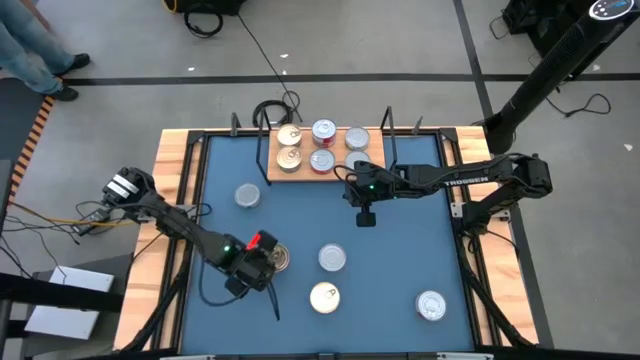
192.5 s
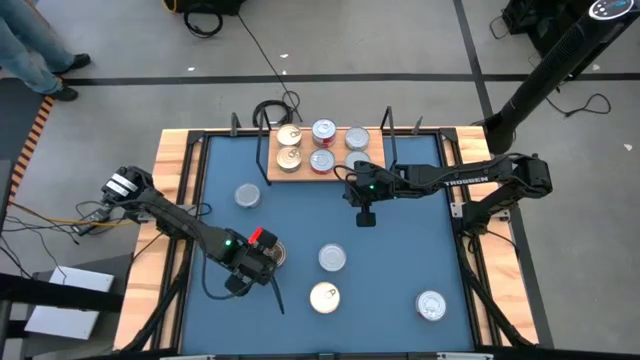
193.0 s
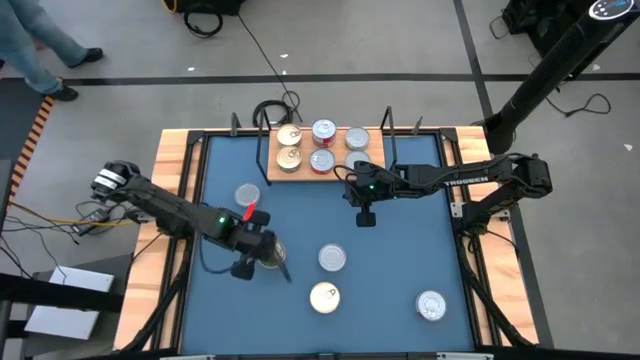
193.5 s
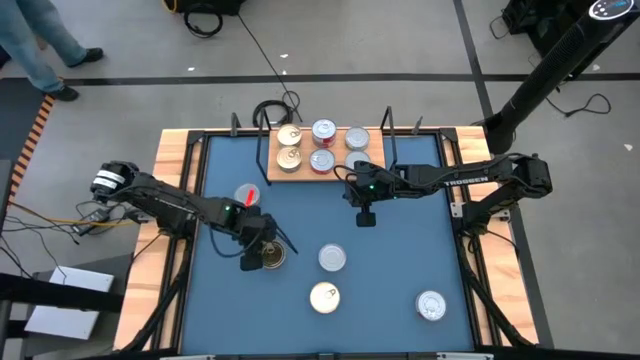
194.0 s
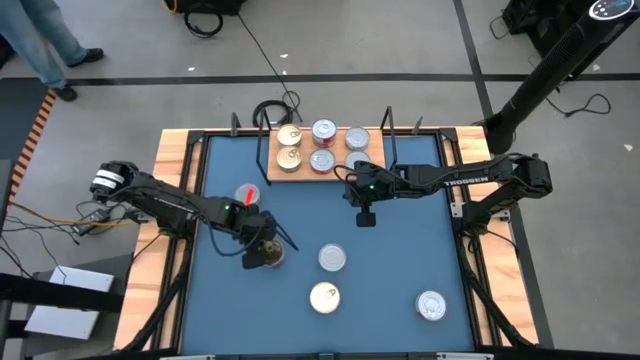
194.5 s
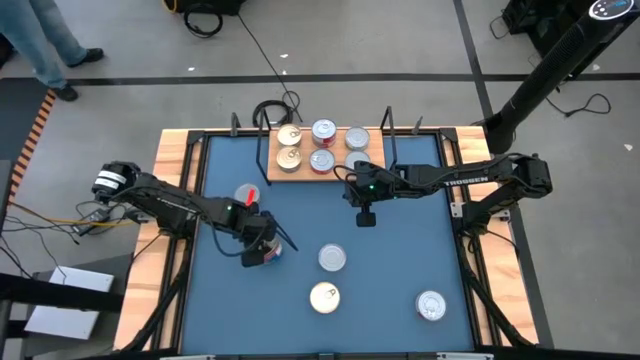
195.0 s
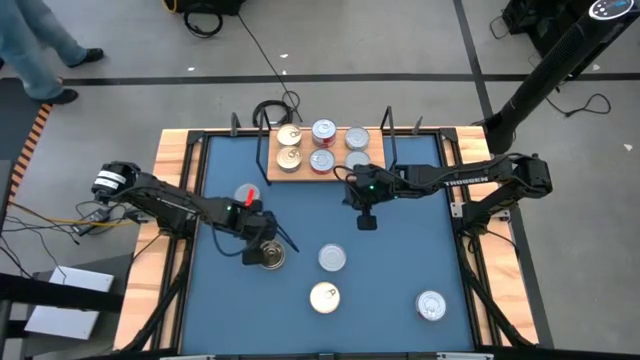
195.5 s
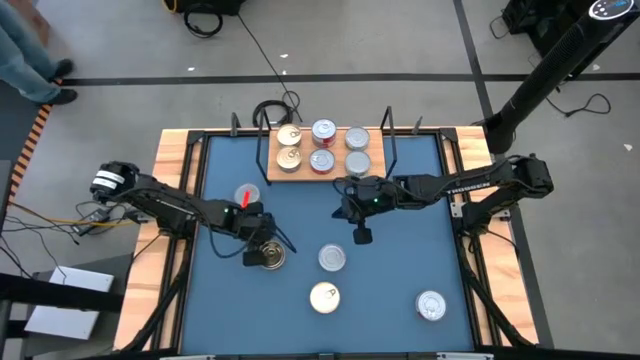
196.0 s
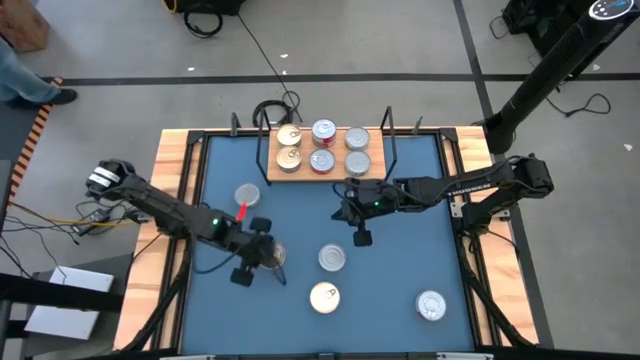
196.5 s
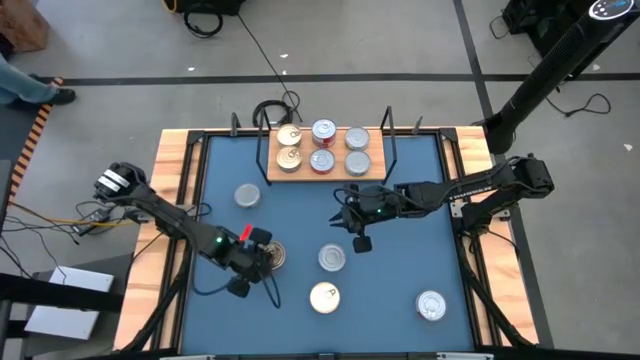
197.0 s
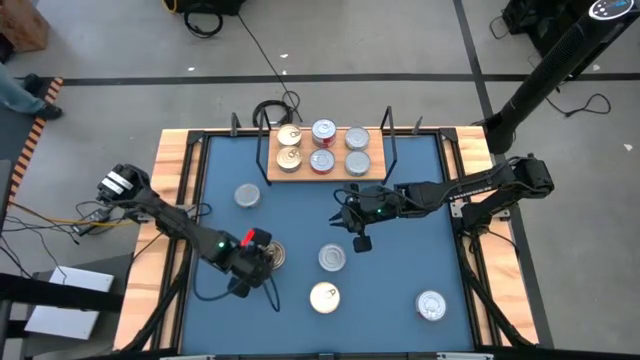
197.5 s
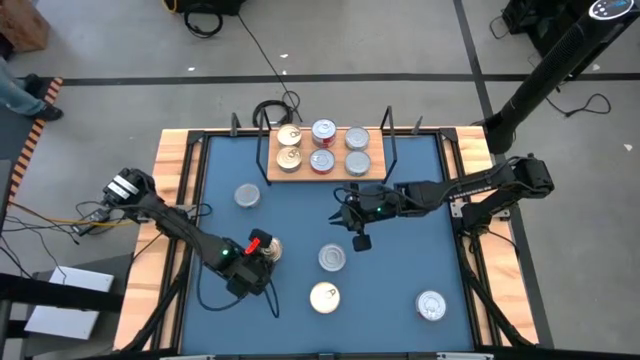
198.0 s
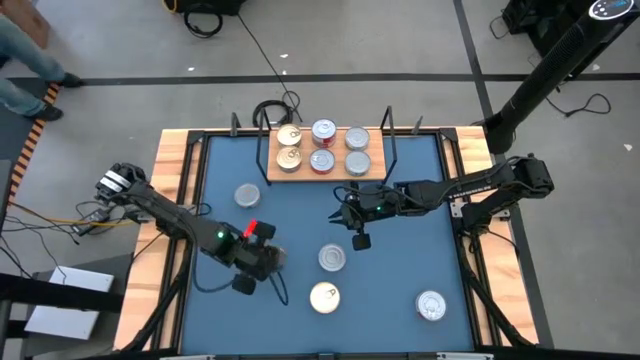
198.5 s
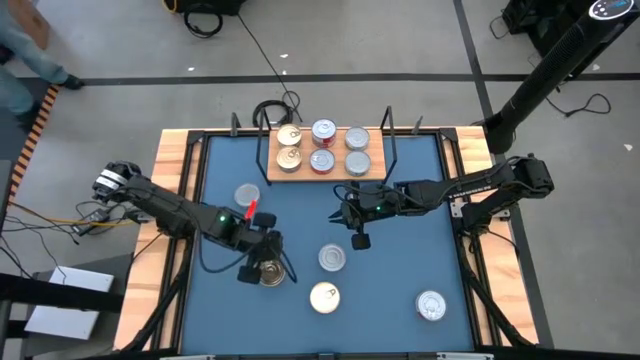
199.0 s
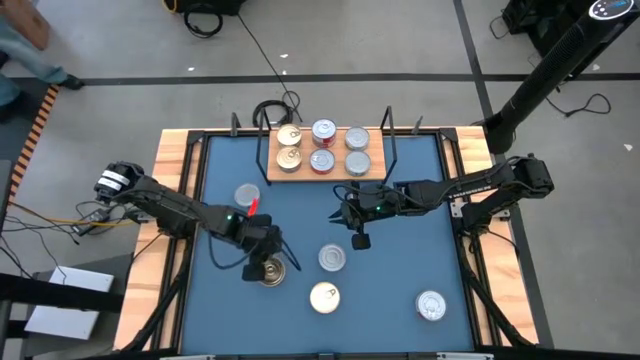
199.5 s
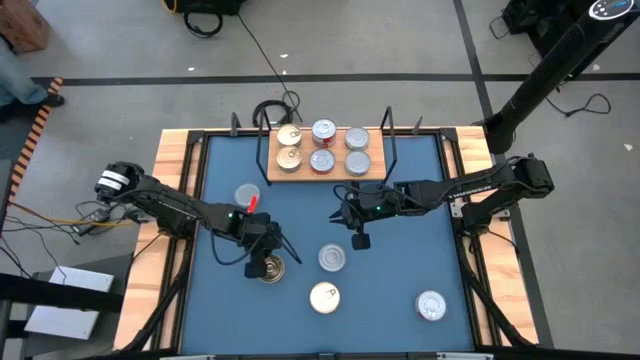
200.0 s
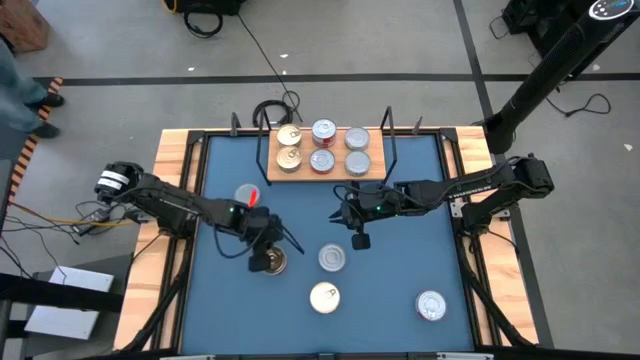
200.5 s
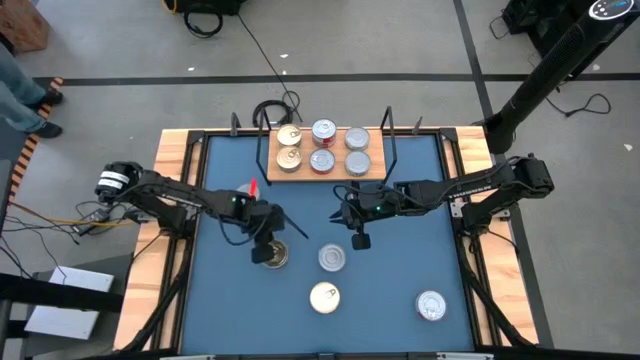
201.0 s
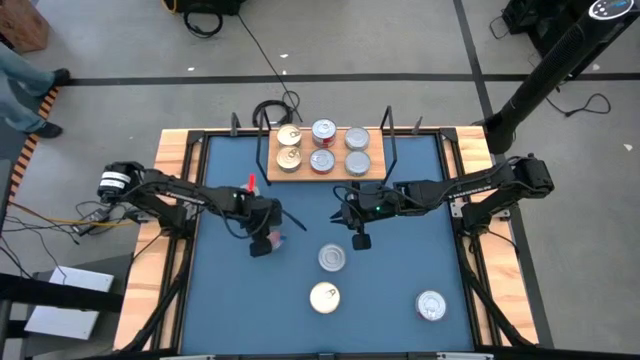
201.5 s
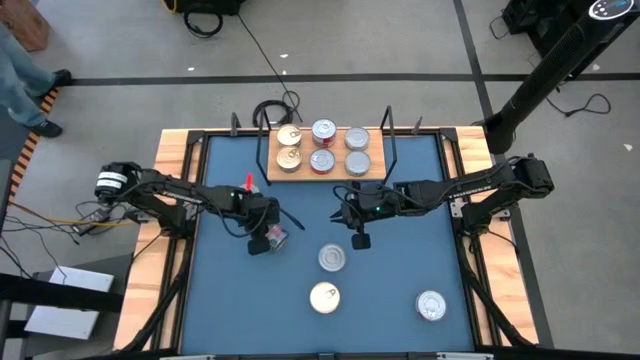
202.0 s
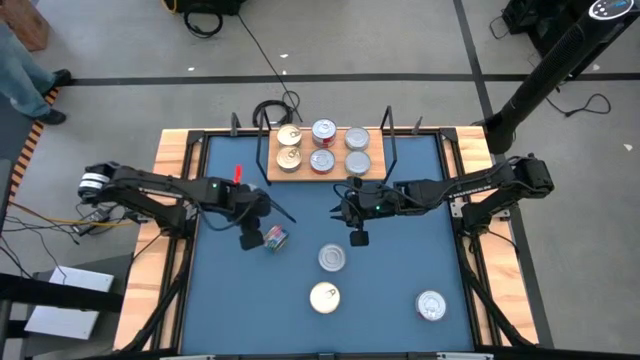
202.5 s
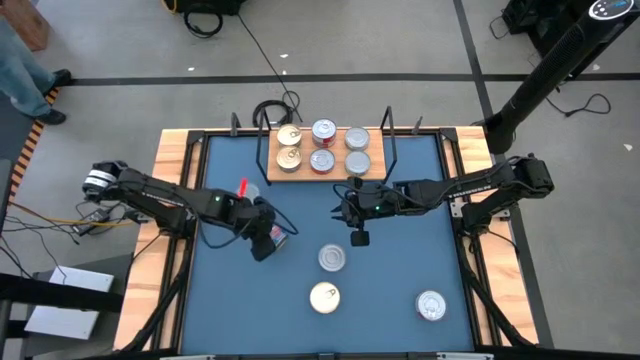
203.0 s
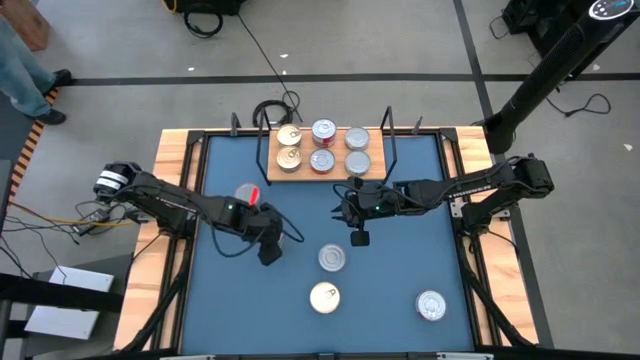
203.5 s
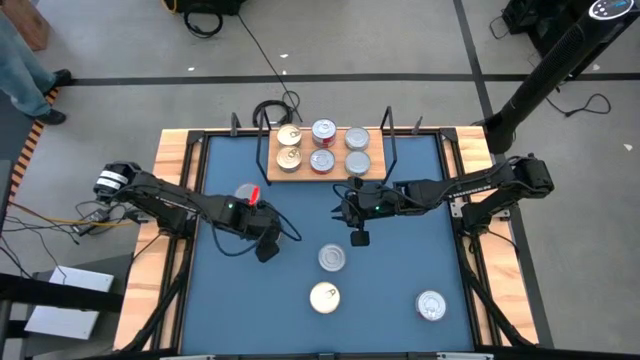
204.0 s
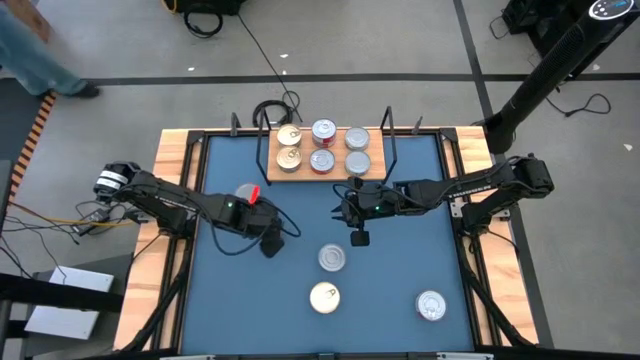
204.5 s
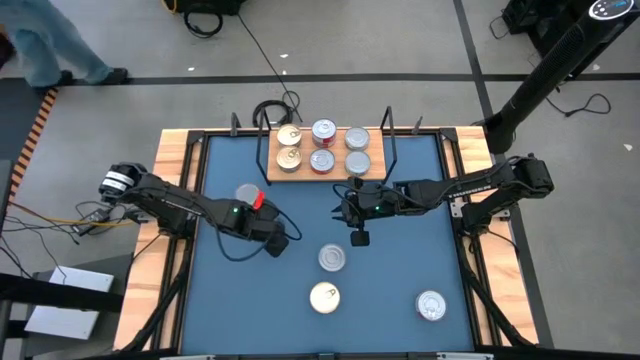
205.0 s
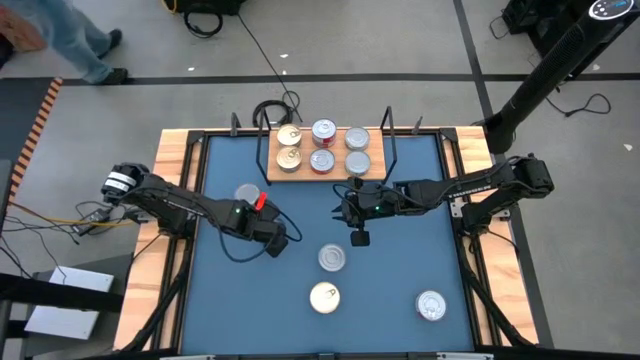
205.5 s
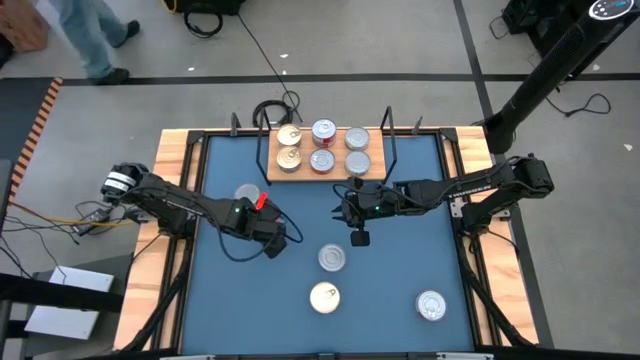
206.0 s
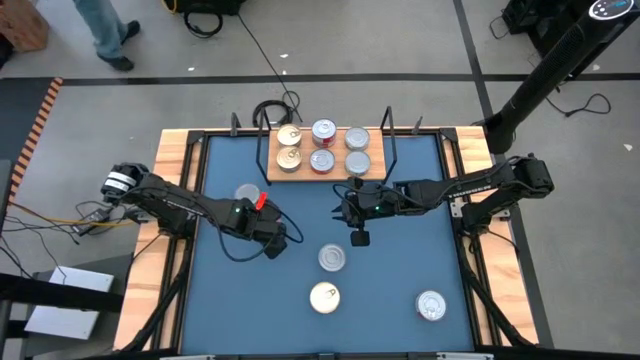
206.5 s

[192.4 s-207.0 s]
Task: Stack canned seafood by type on shelf
Stack the left blue tuna can on the top blue tuna can on the shelf

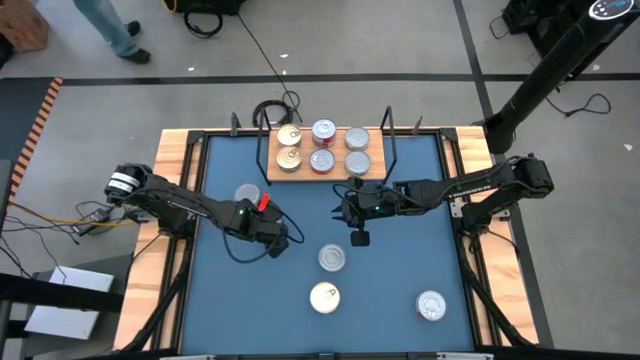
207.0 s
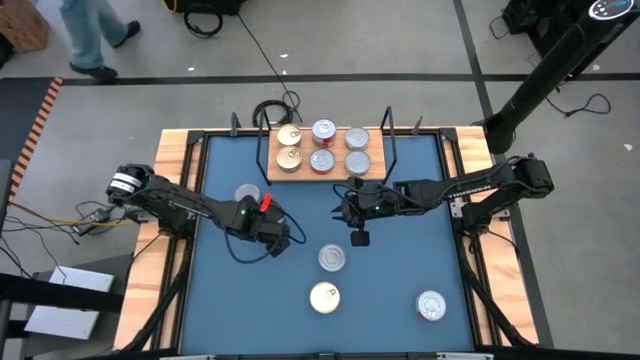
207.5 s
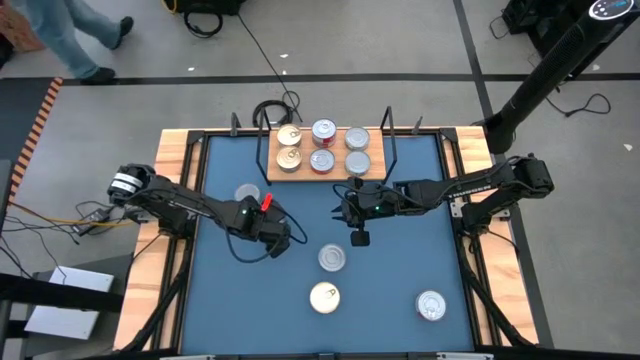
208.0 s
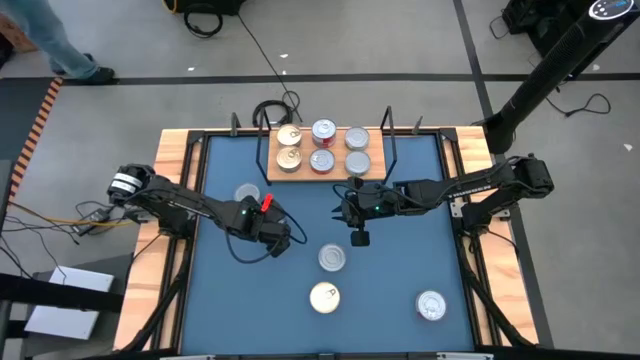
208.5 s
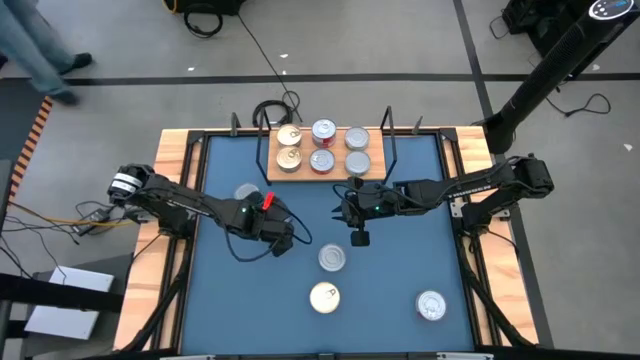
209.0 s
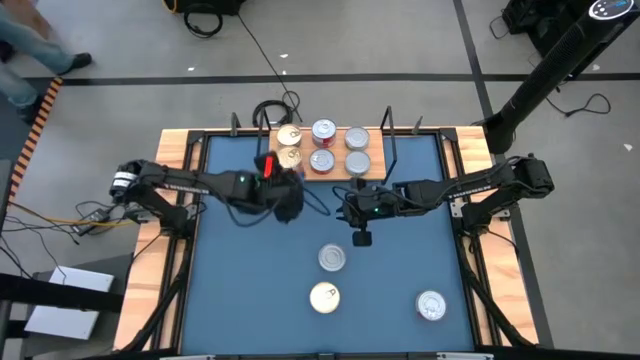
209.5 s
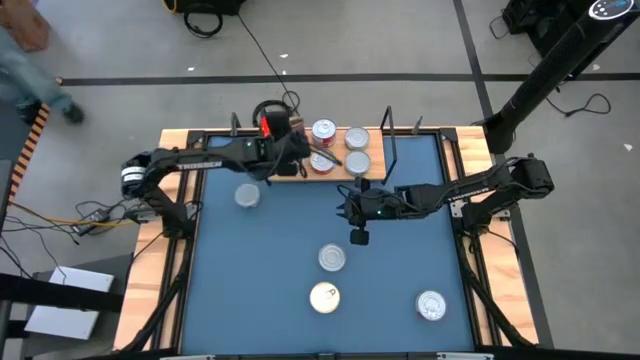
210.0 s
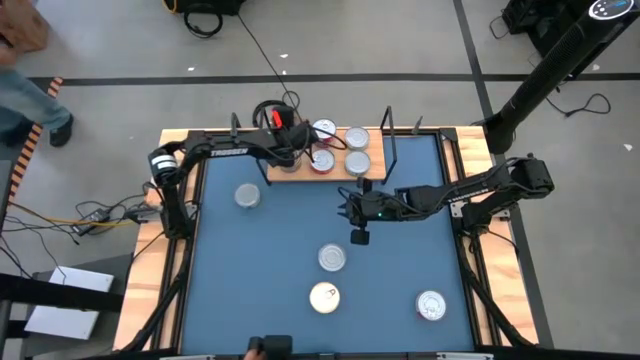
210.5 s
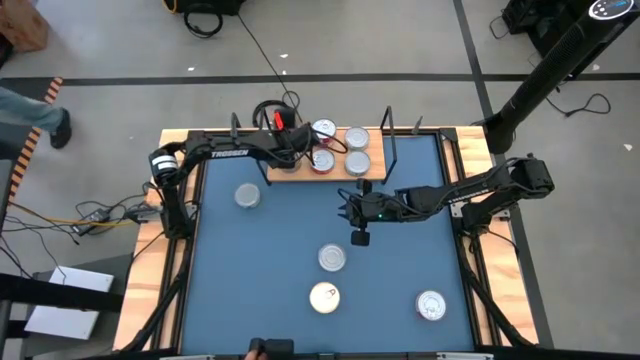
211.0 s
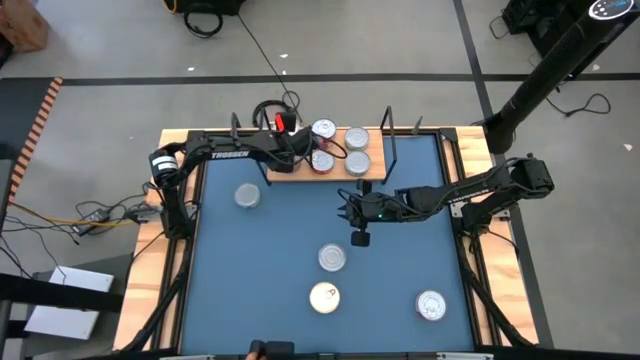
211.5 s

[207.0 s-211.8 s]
Stack the left blue tuna can on the shelf

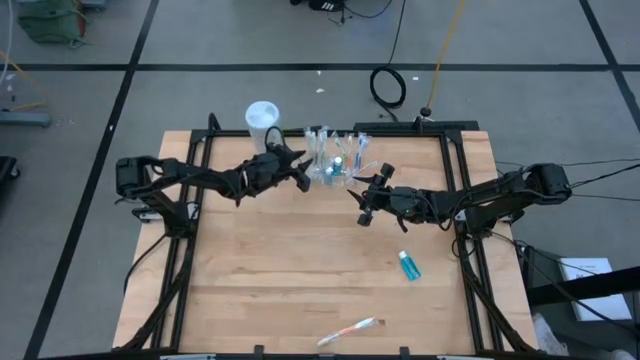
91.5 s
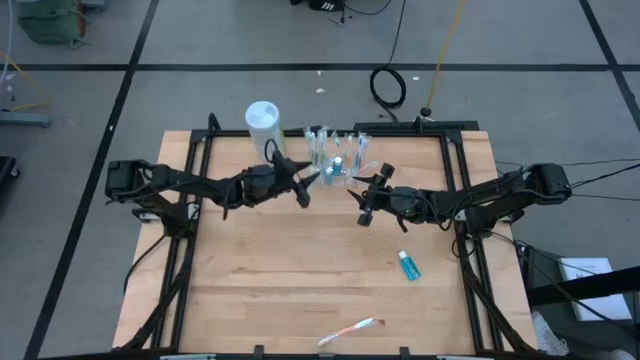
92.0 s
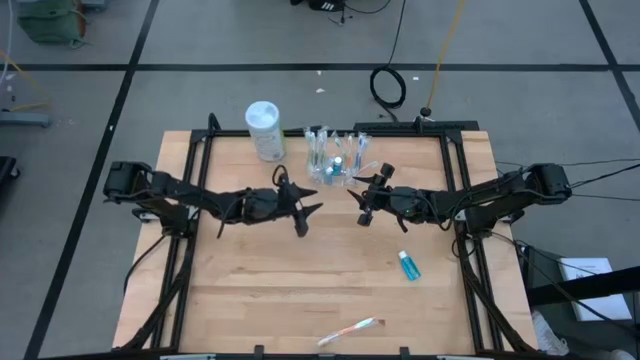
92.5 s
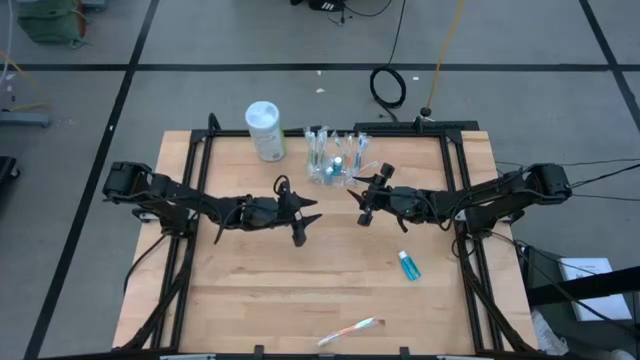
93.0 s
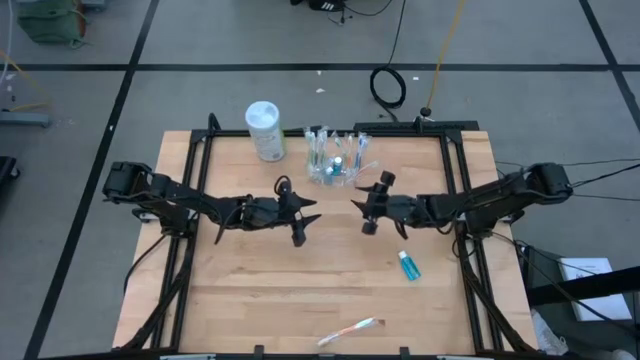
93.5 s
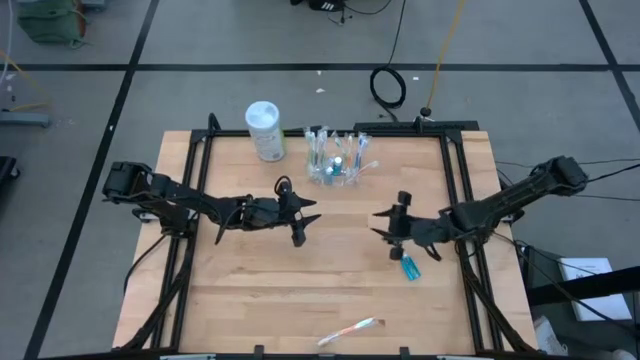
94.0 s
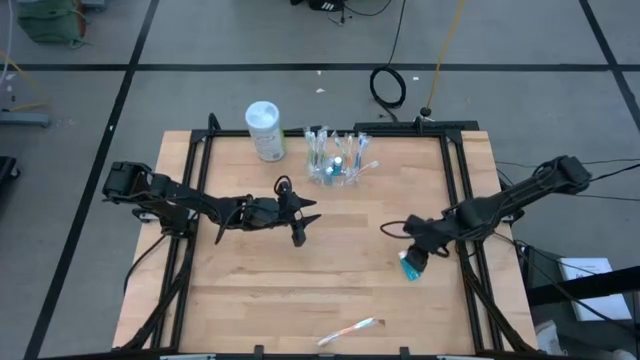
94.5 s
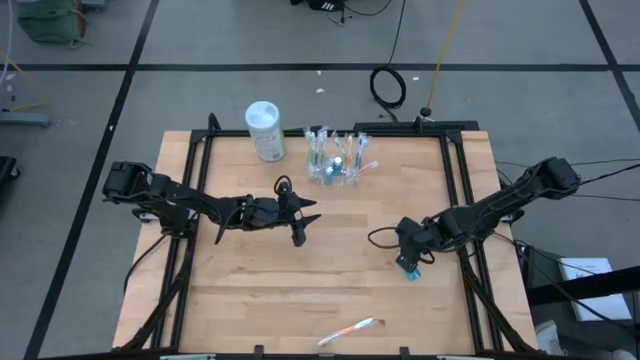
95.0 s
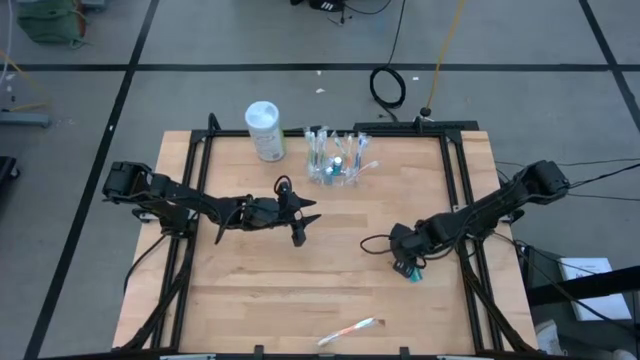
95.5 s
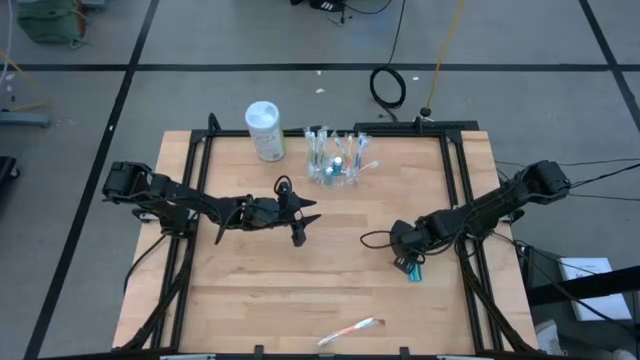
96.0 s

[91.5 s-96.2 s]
Task: Pick & Place toothbrushing station
Put the blue mouthwash into the transparent organizer
